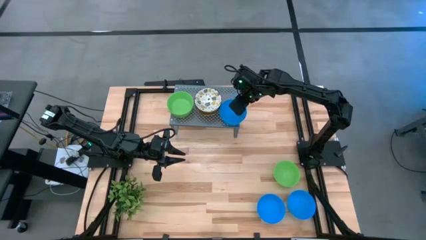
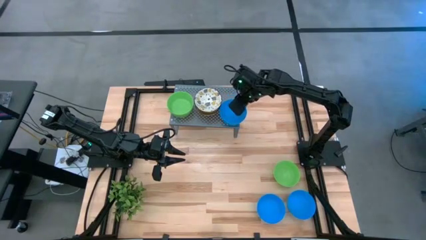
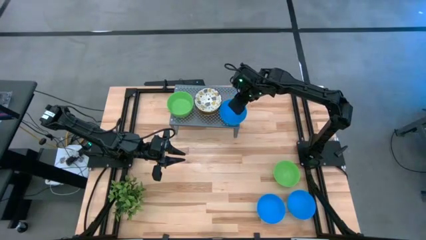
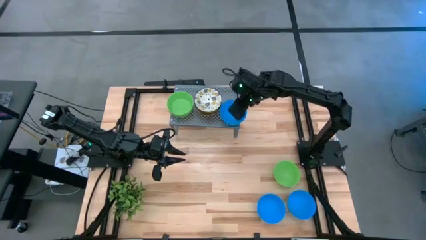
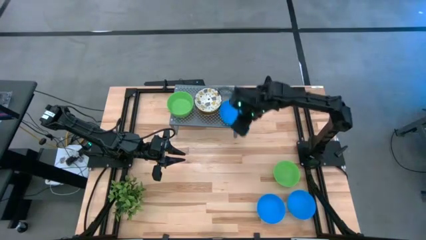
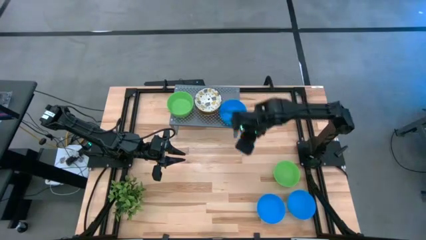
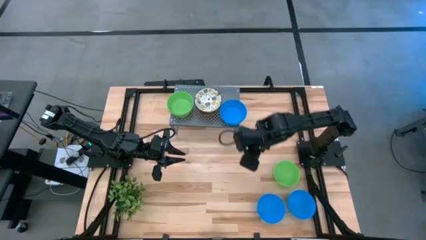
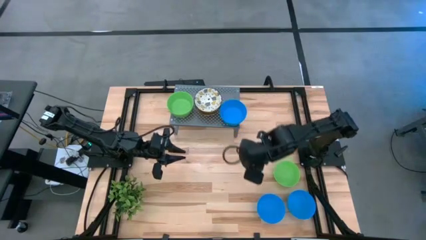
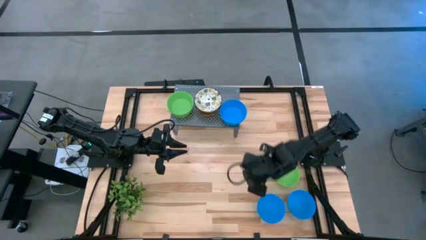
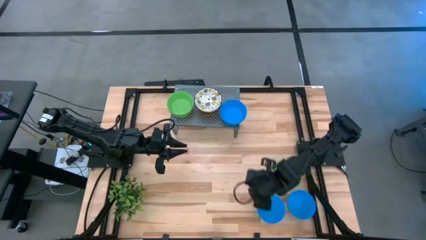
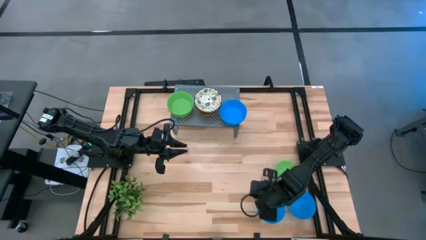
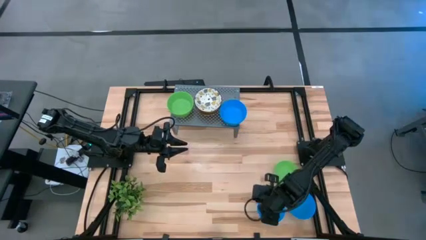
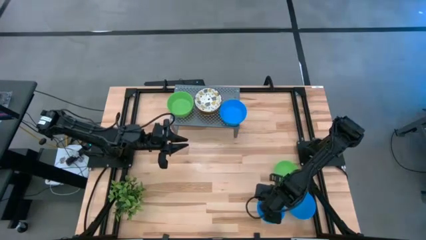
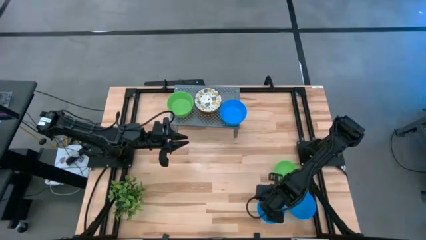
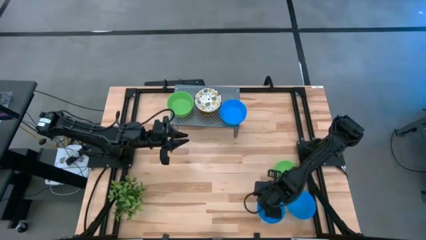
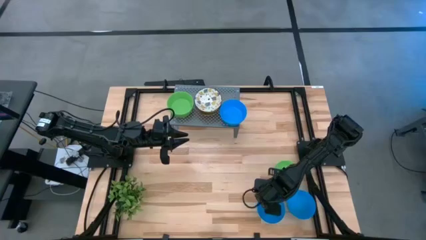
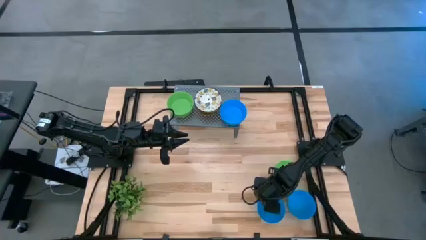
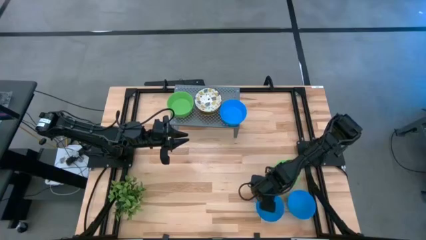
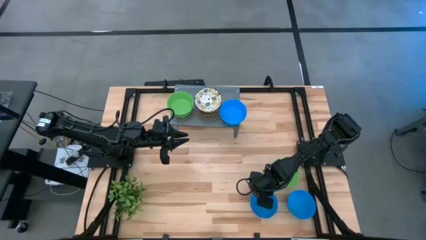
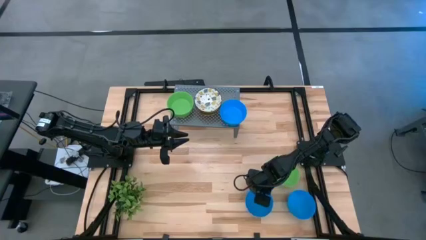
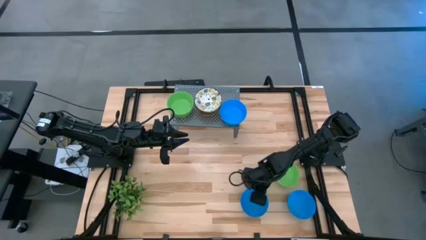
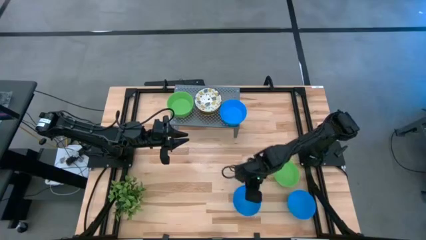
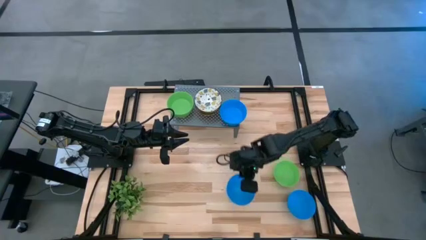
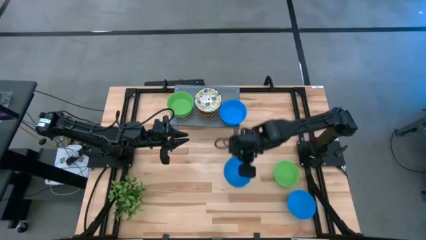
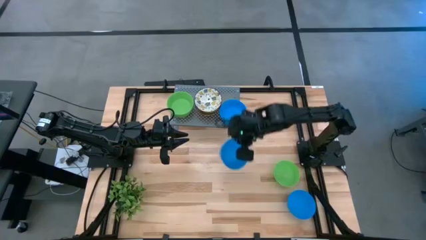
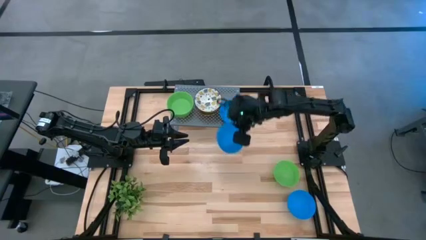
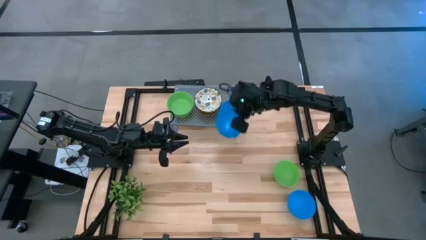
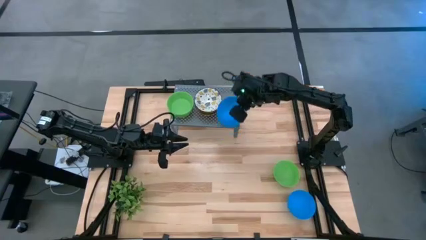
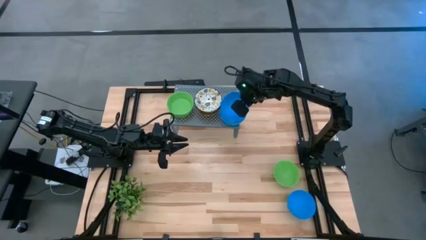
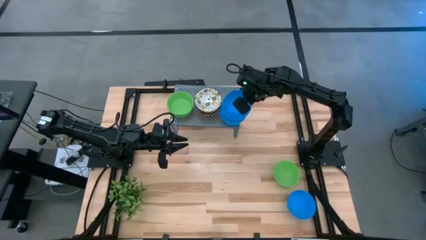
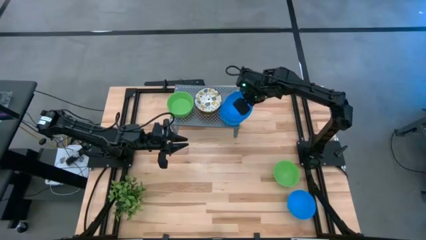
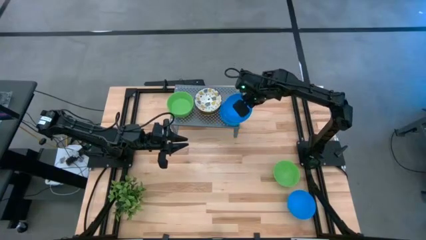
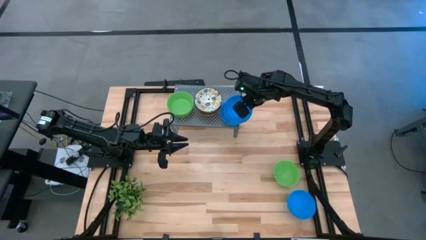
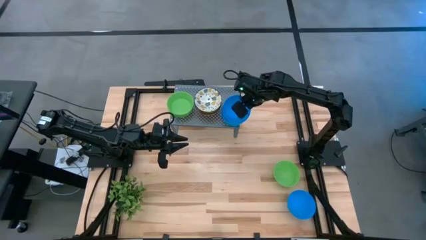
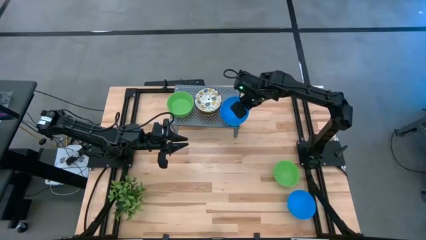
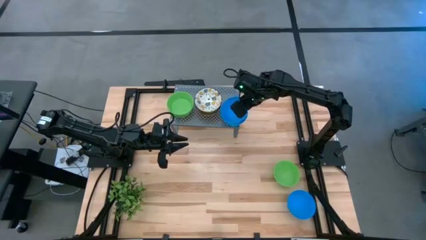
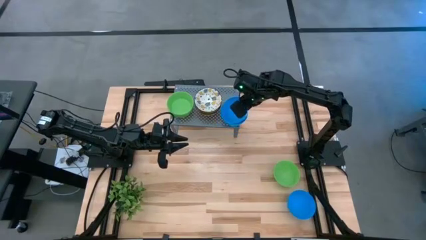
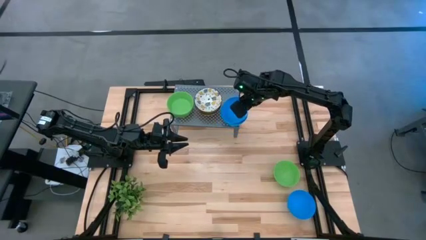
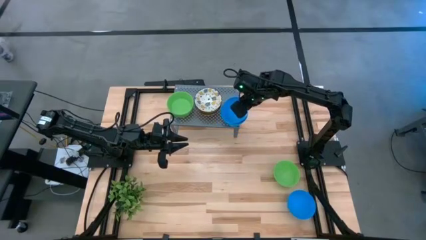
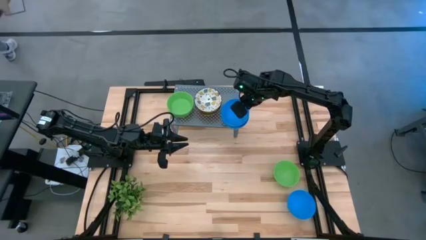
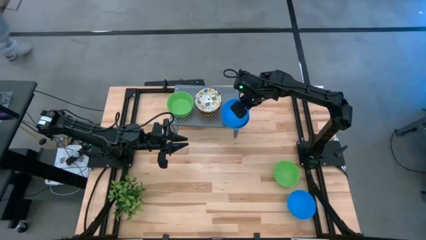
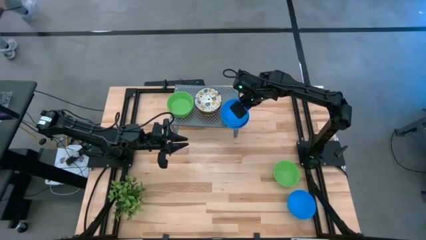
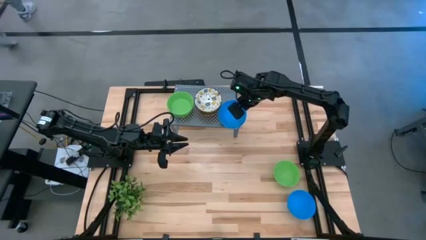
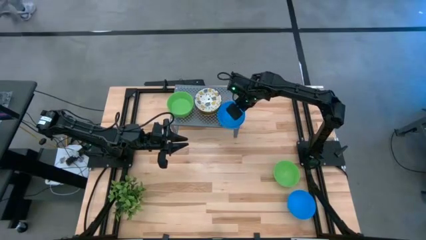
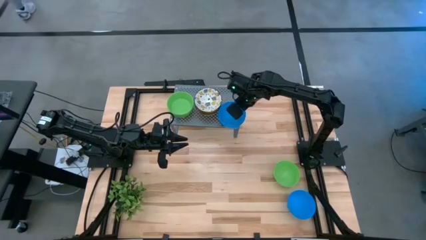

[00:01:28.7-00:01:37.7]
Task: Pick & Place Mini bowls
Stack the blue bowl on top of the other blue bowls on the shelf

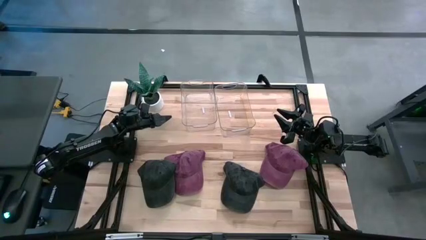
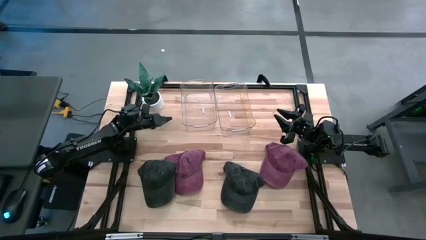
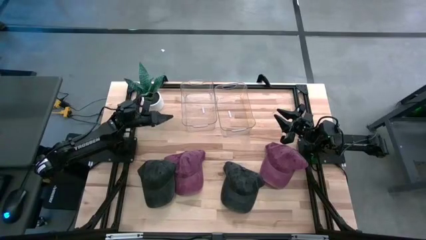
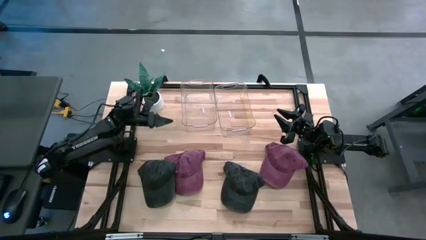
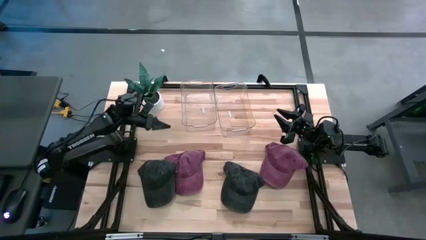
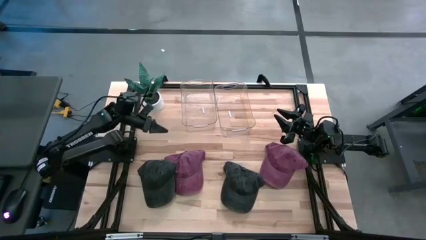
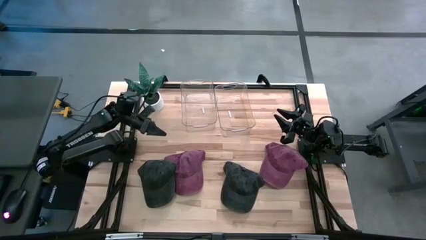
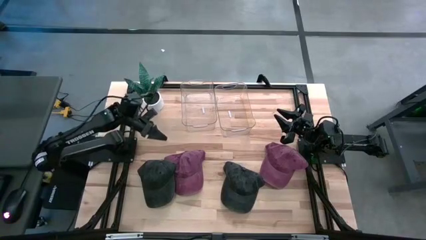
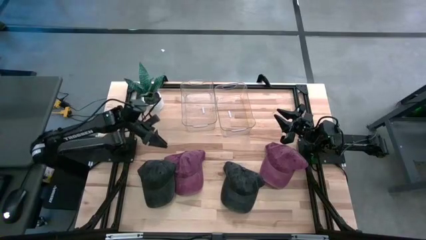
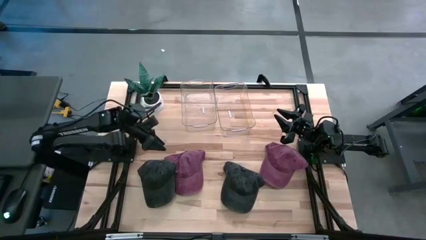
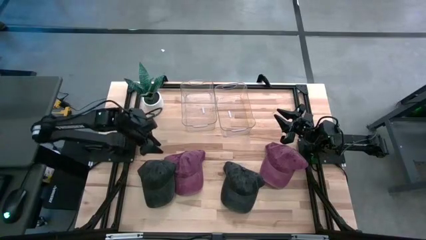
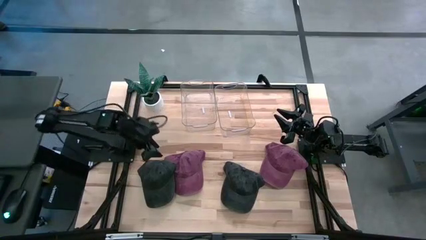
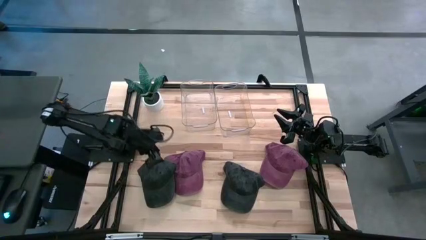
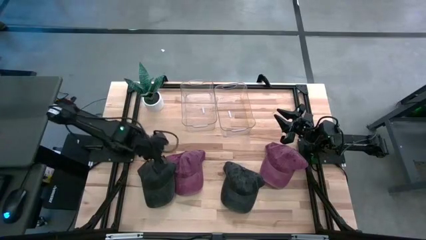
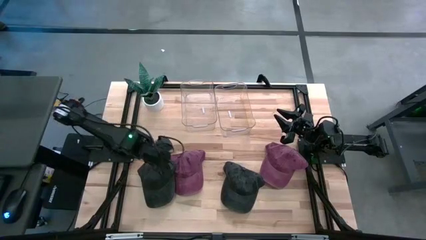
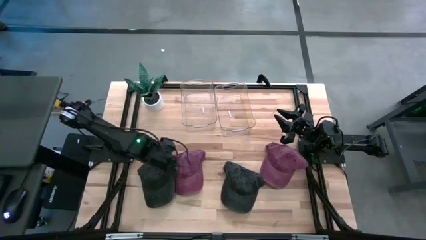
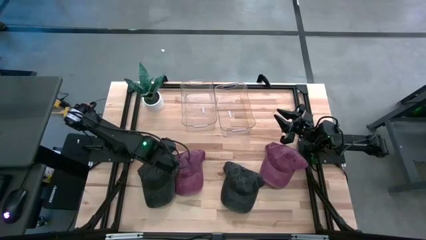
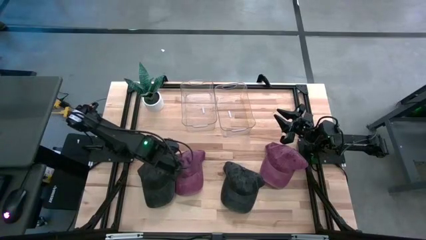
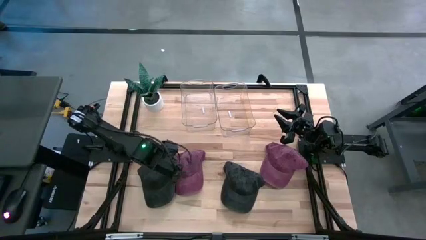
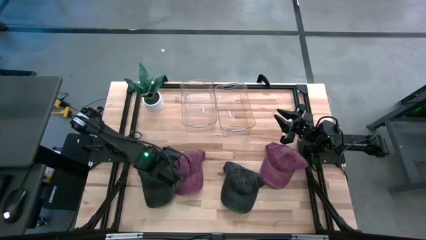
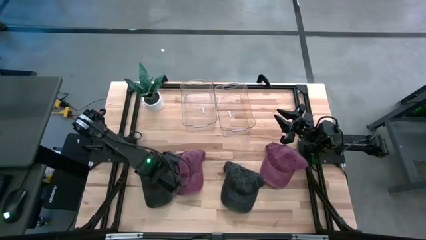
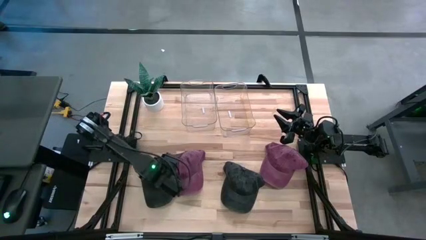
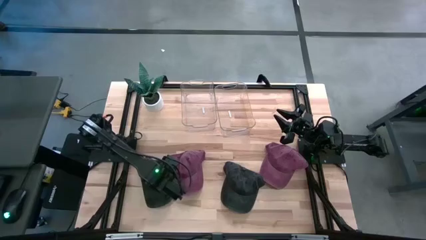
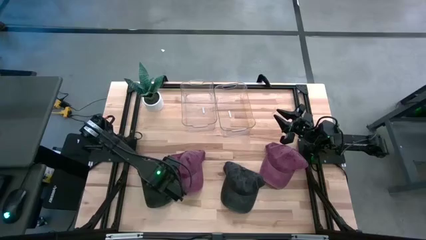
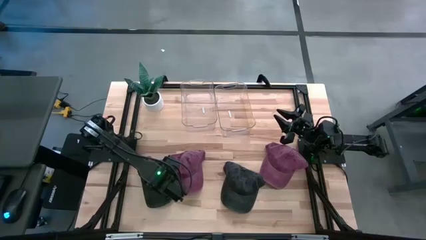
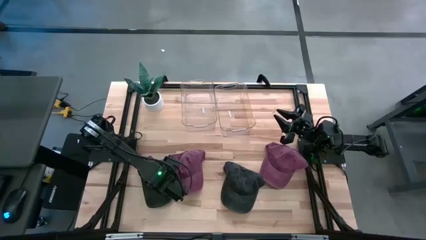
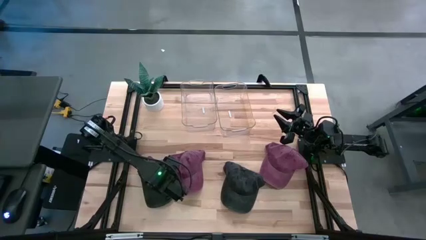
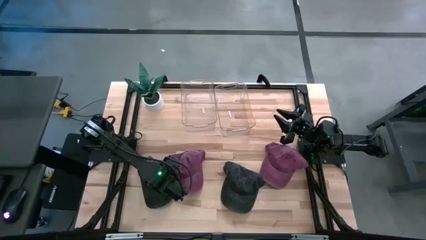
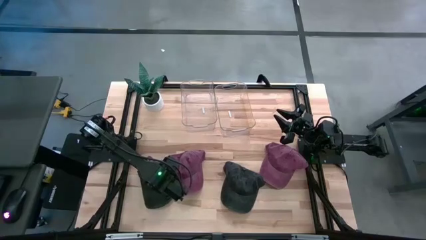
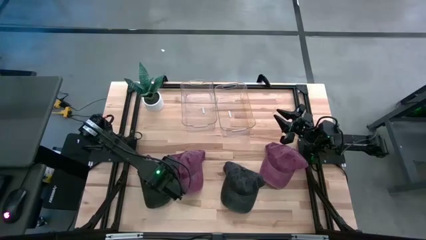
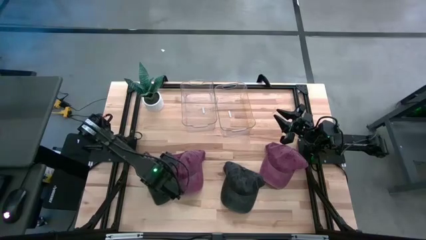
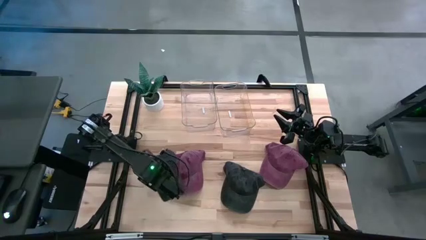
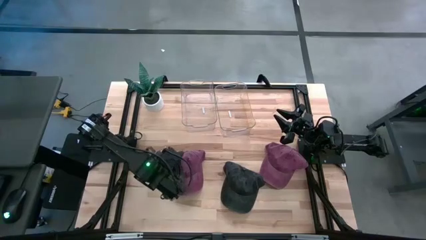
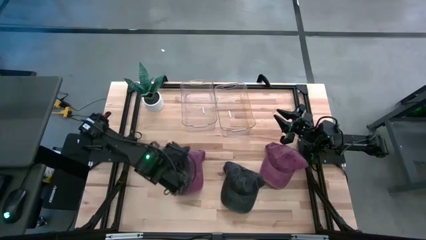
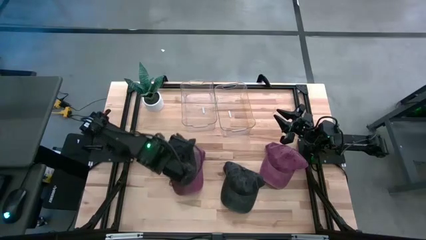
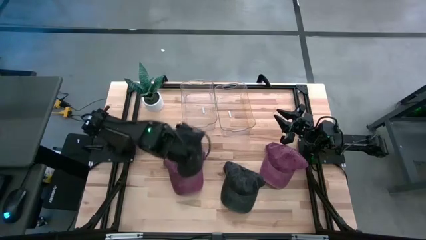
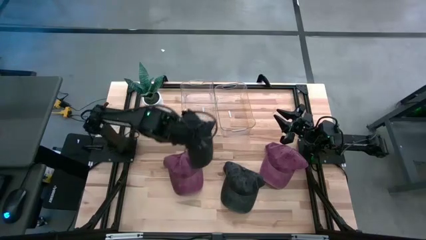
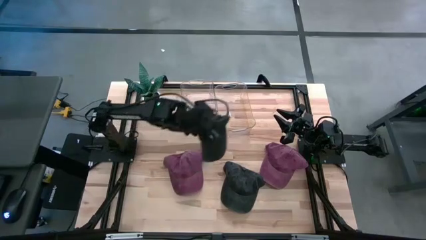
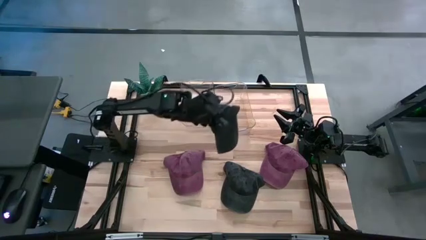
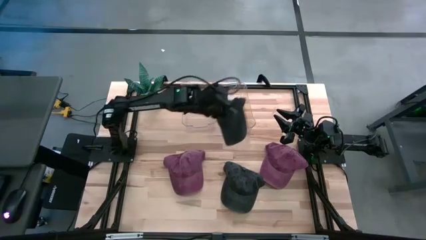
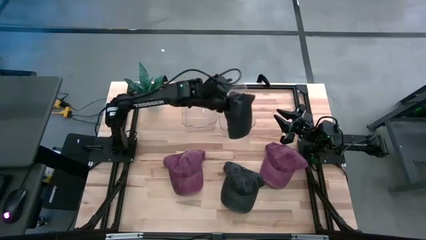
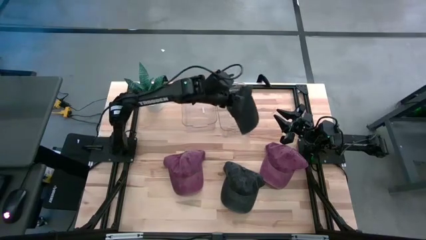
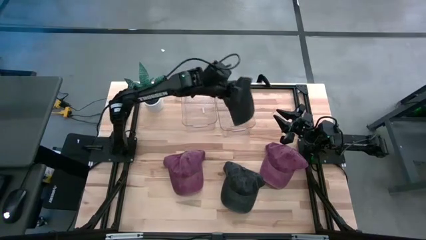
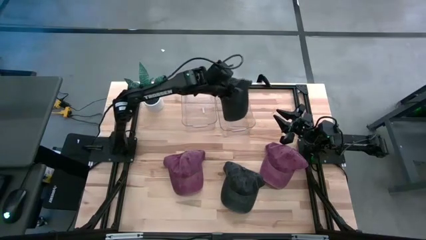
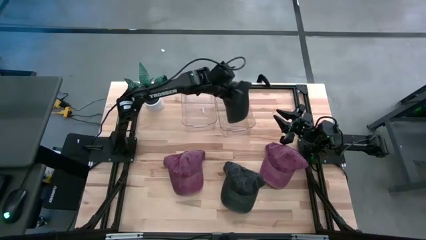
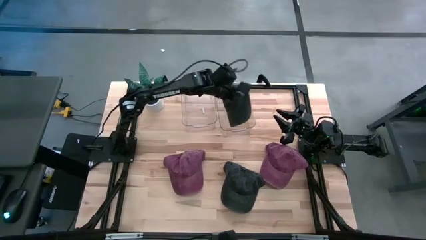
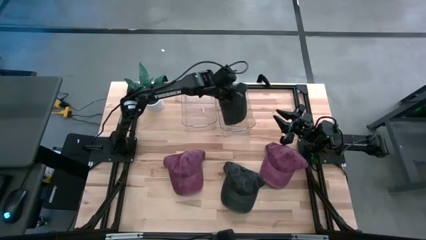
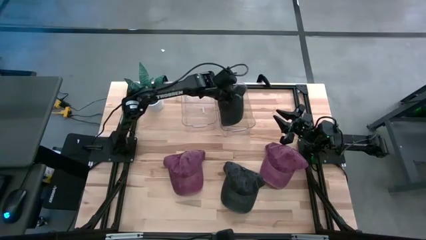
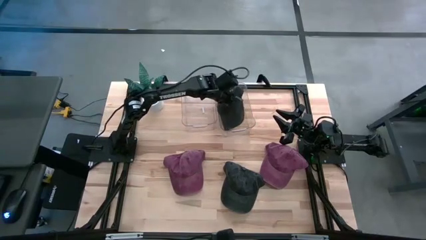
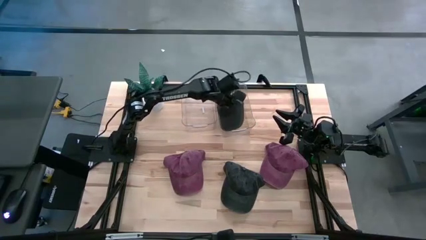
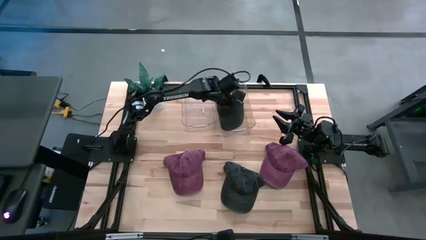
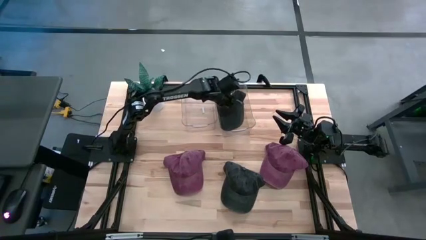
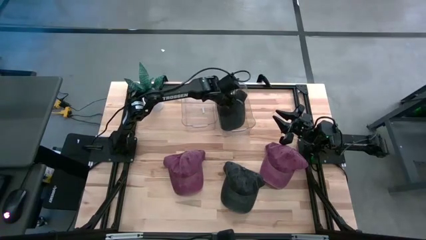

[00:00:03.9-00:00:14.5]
Task: Pick & Place hat
Put the left black cap into the right transparent bin
